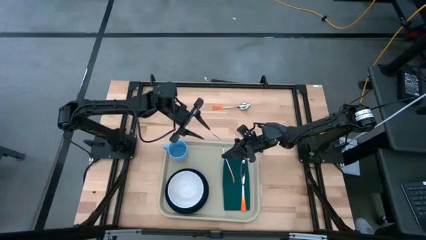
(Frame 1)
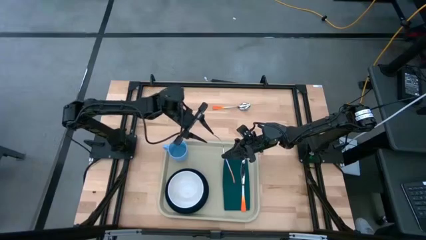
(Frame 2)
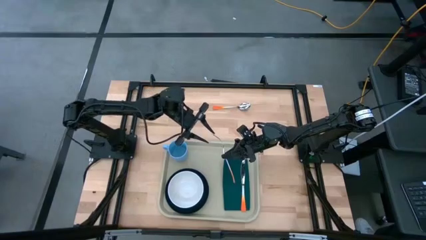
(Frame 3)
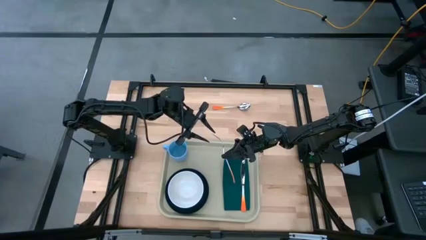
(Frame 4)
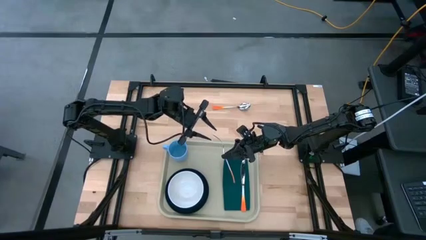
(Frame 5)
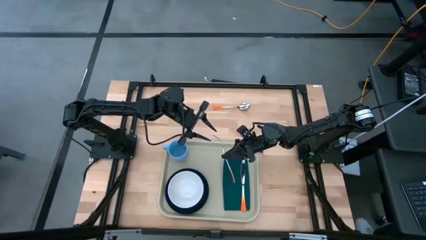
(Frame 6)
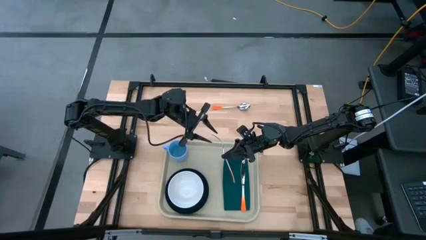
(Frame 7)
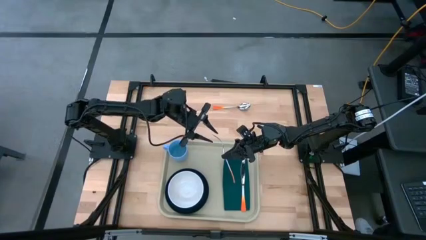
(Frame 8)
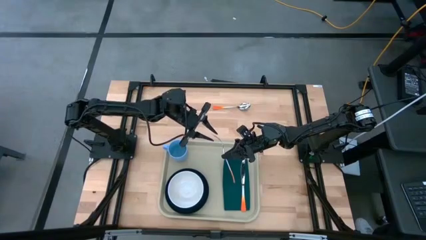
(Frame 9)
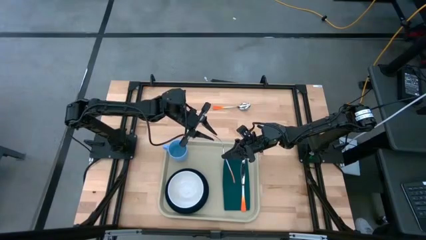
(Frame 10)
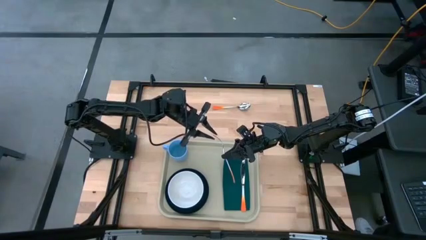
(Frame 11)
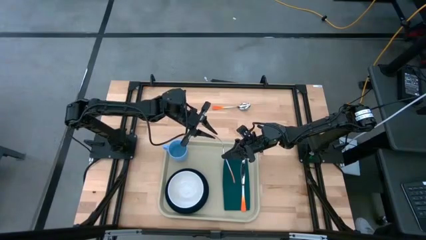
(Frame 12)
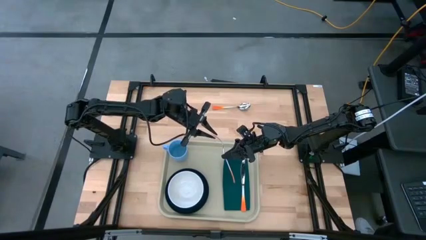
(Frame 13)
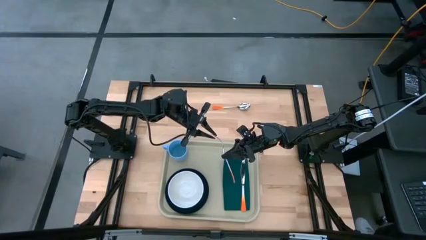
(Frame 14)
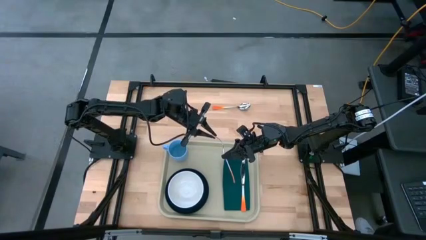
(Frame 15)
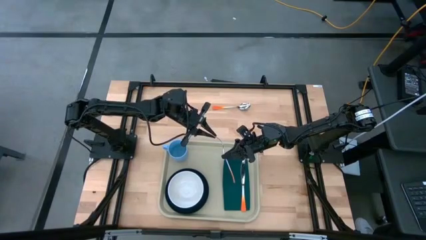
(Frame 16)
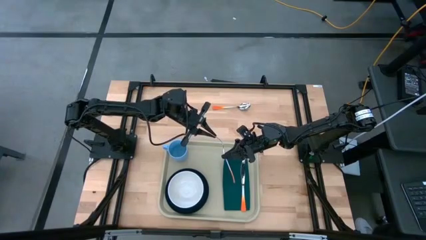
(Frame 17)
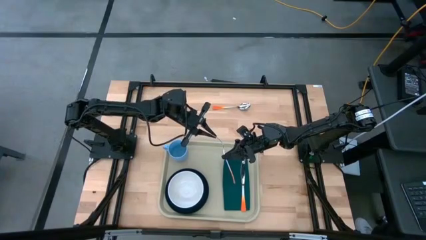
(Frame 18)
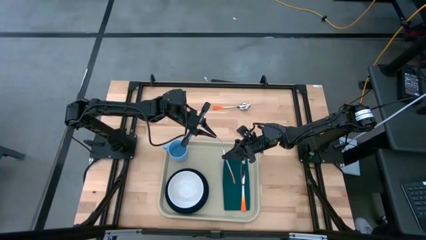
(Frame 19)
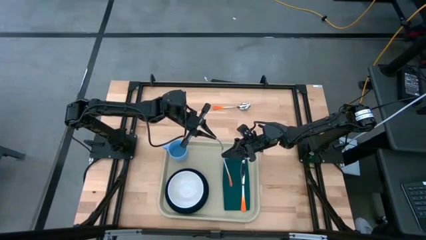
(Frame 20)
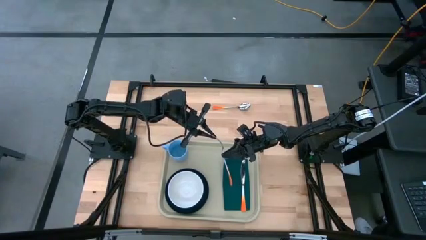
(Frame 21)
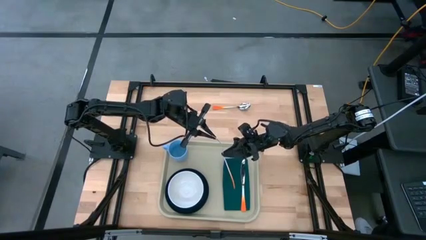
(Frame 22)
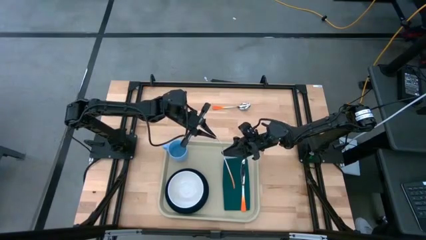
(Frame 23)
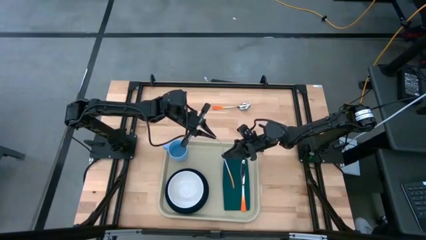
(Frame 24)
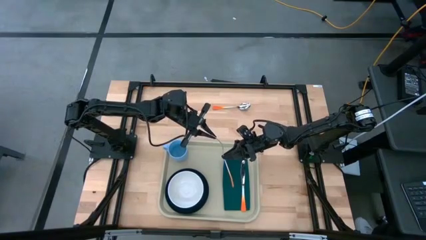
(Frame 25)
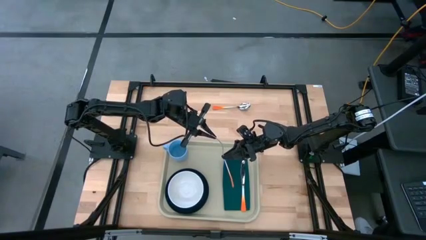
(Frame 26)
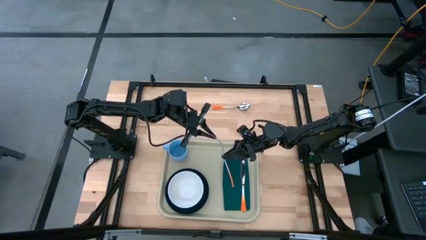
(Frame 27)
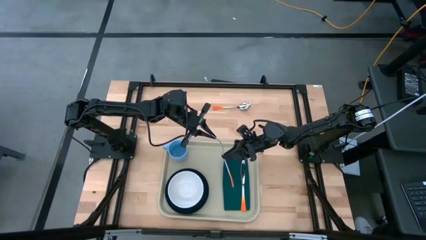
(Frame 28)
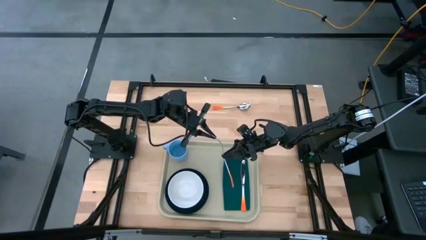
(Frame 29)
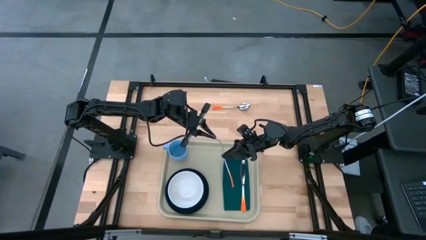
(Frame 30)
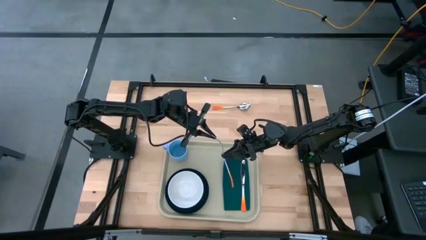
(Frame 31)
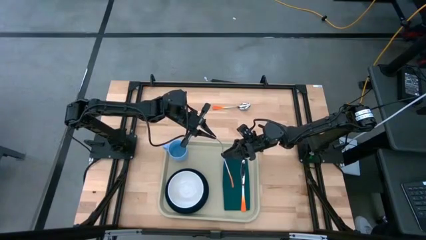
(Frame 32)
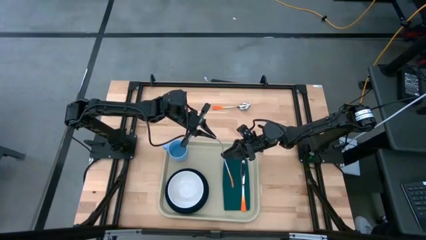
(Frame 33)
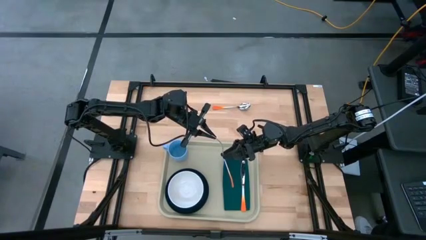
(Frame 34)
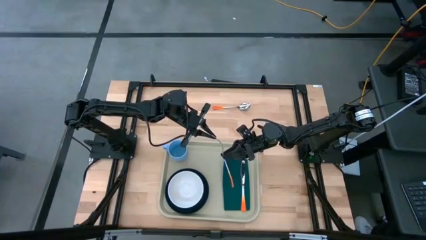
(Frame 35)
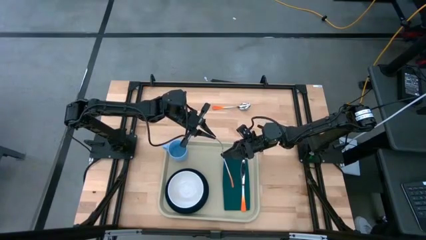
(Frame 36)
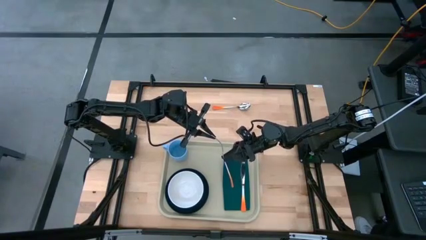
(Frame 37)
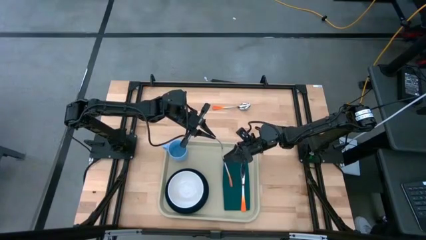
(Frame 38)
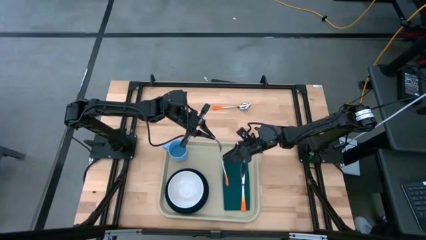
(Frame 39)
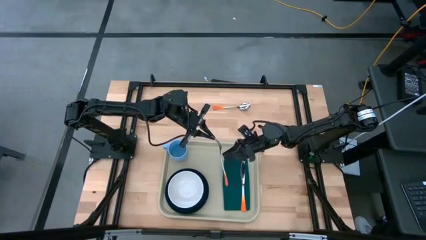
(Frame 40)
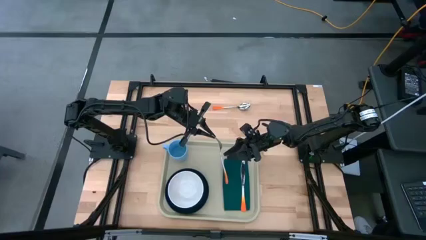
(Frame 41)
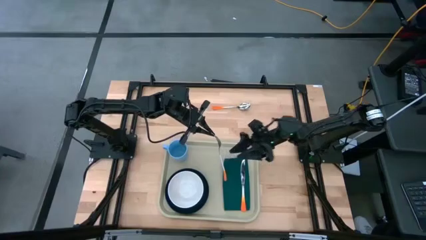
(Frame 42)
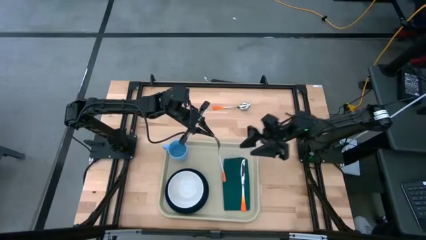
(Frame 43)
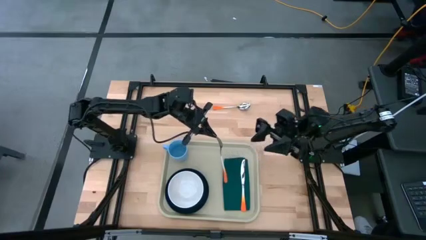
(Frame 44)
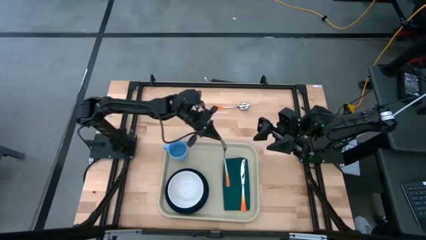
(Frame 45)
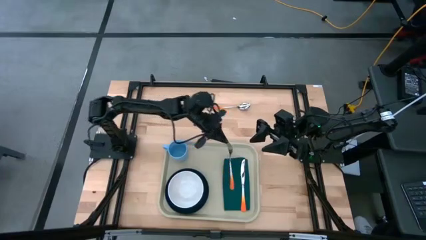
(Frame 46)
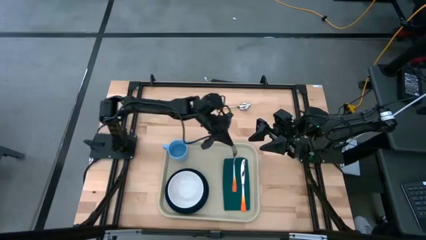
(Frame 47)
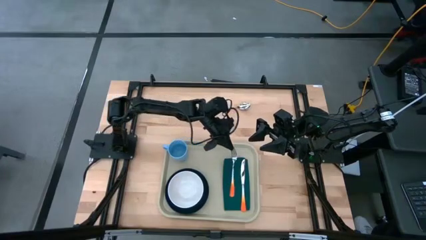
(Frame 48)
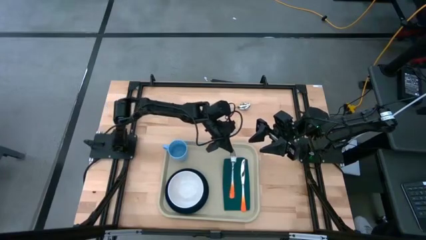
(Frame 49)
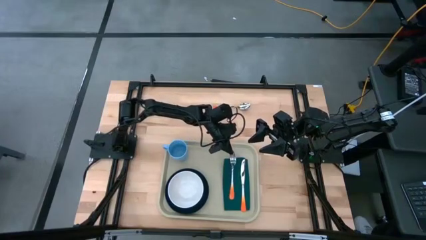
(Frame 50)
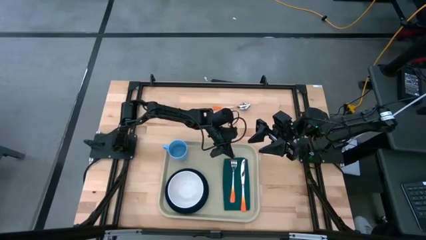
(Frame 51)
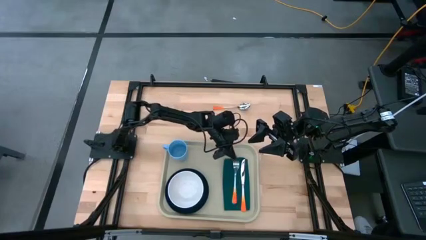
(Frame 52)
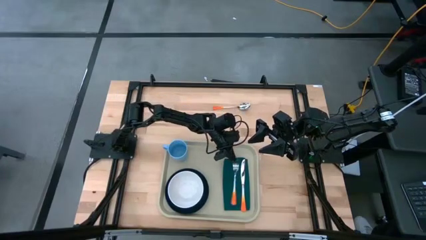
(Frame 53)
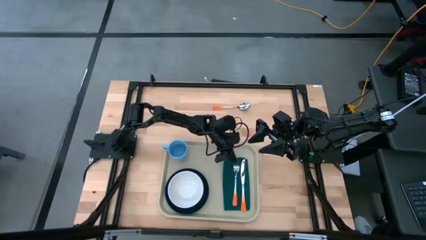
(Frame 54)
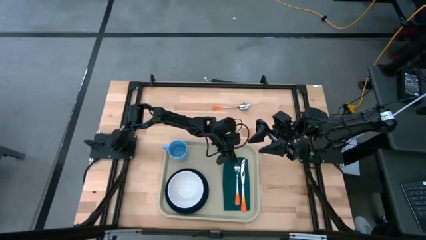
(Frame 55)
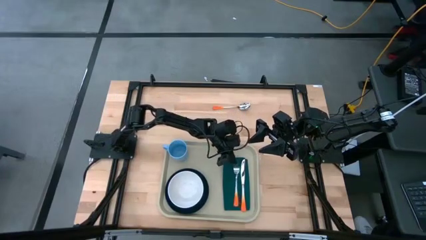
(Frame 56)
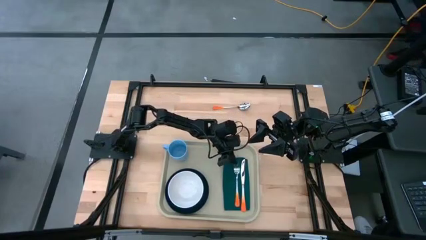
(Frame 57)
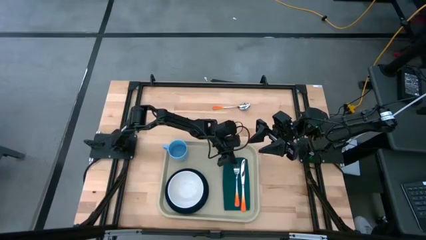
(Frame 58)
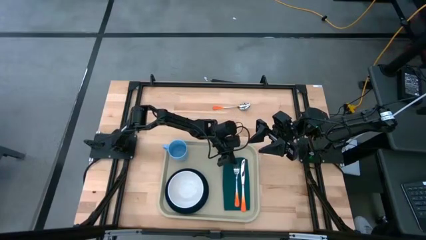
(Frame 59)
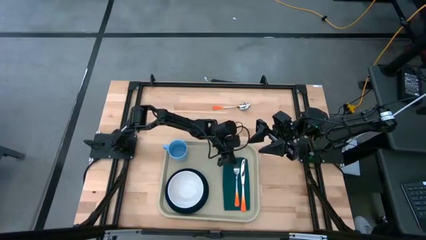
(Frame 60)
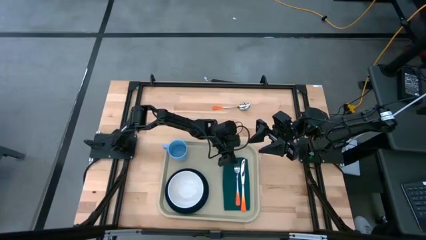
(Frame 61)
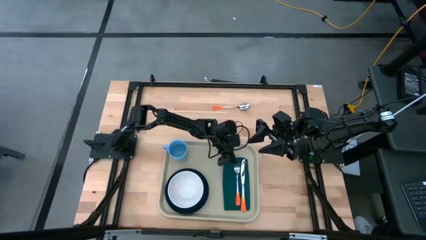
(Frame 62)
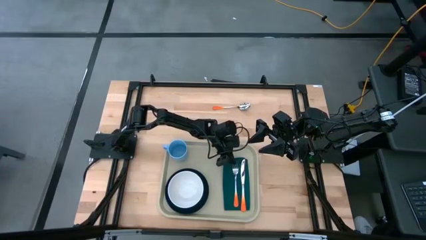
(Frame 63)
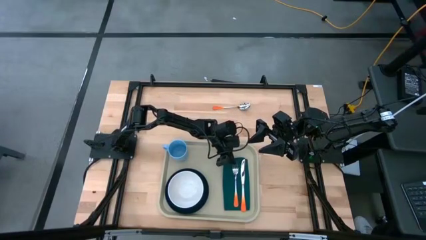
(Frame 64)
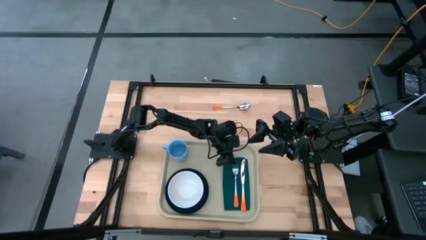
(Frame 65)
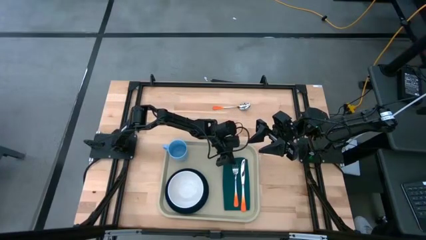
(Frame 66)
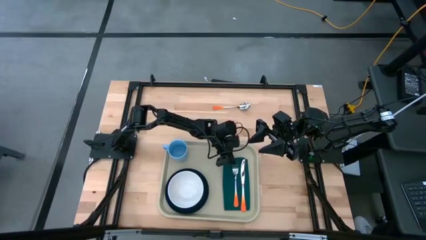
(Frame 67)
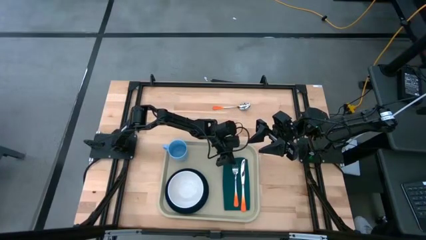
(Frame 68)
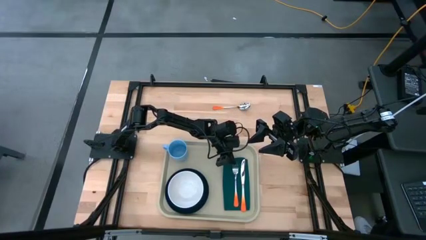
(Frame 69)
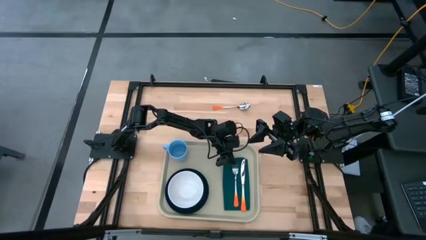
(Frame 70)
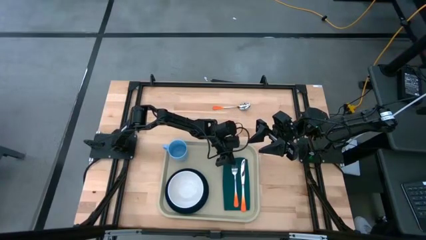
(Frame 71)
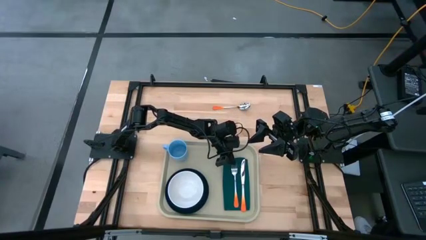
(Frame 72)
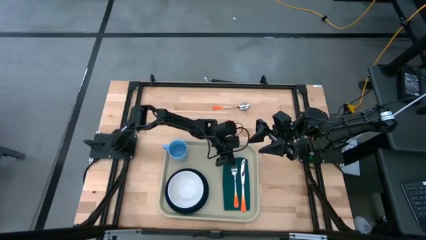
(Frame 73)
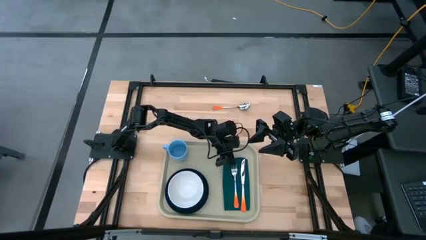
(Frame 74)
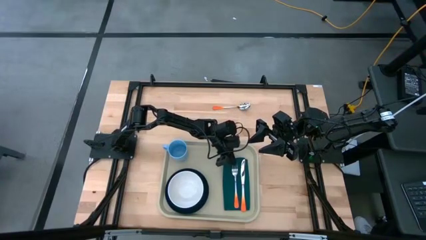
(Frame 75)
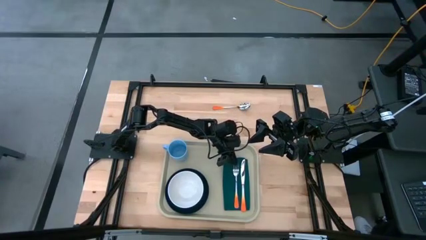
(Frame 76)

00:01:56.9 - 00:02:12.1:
Task: Set up tray
Put the orange fork on top of the napkin to the left of the orange knife
